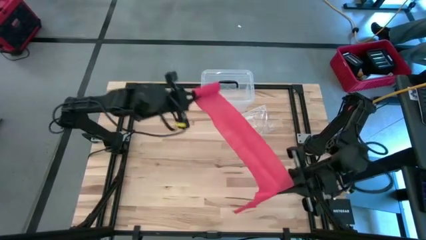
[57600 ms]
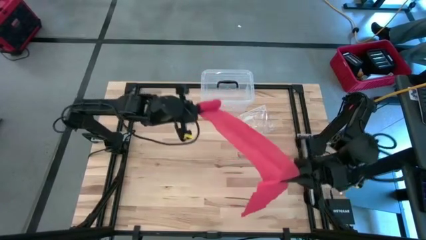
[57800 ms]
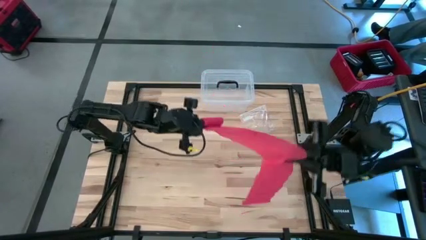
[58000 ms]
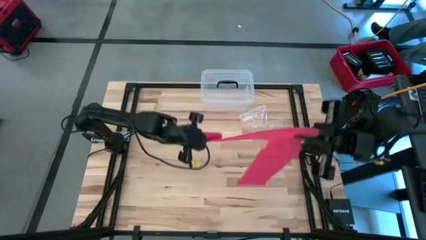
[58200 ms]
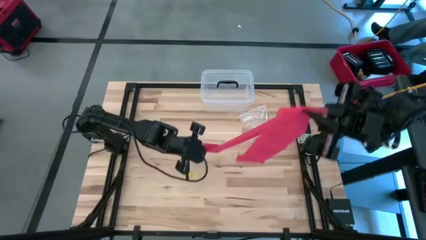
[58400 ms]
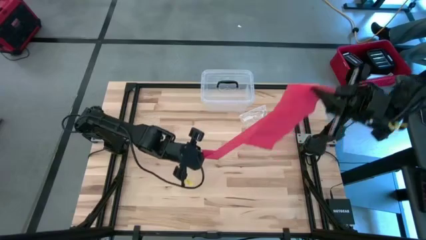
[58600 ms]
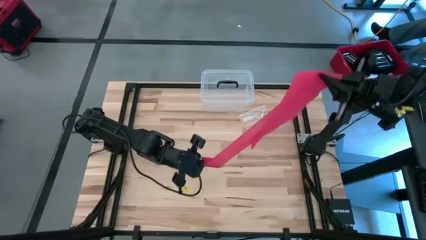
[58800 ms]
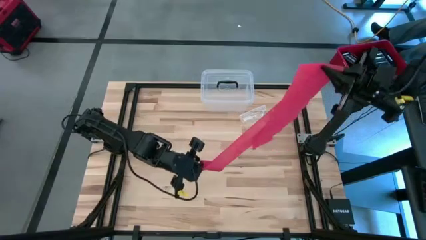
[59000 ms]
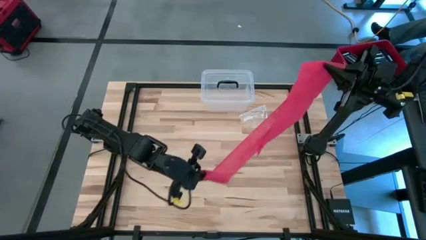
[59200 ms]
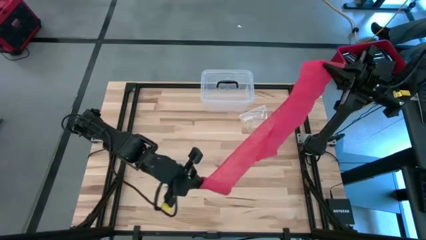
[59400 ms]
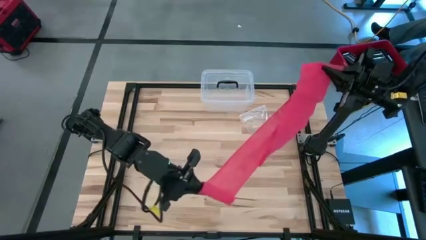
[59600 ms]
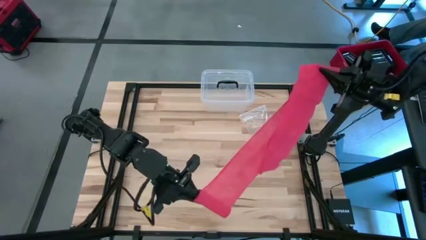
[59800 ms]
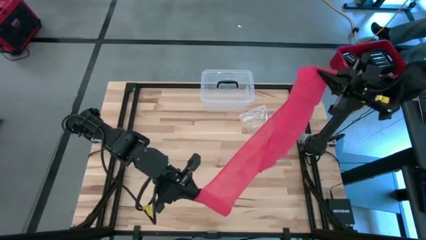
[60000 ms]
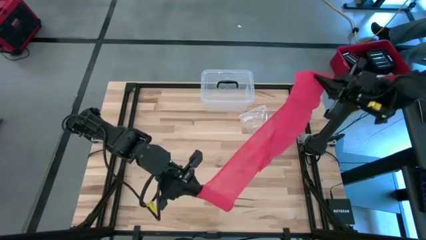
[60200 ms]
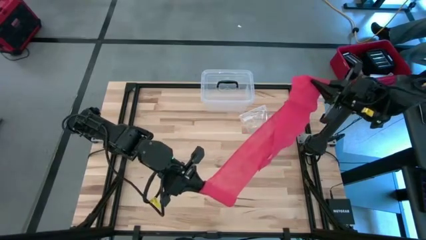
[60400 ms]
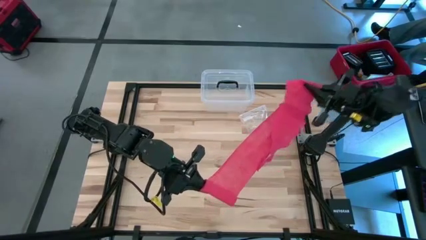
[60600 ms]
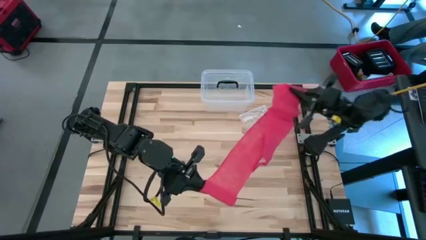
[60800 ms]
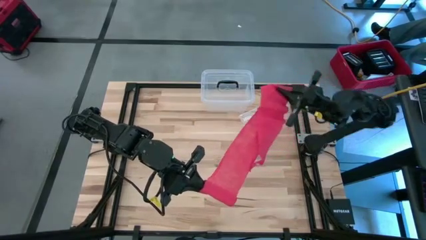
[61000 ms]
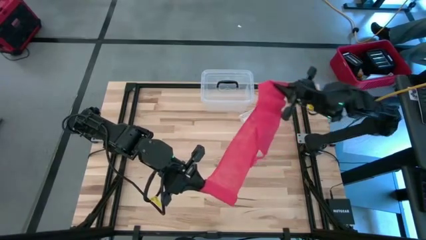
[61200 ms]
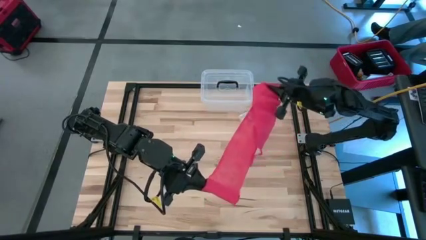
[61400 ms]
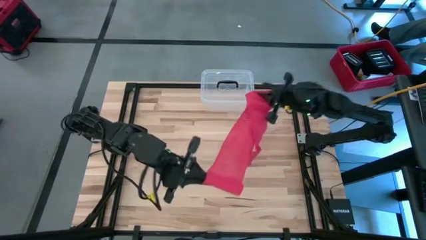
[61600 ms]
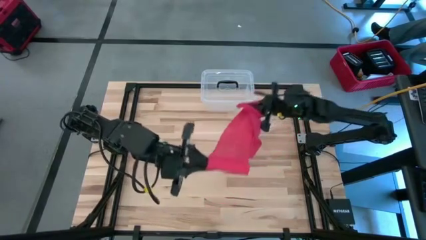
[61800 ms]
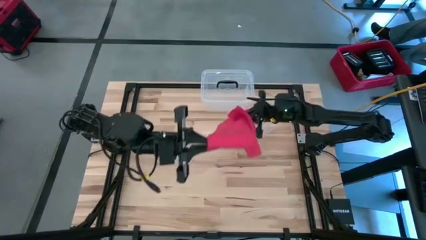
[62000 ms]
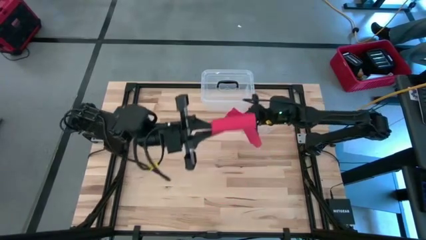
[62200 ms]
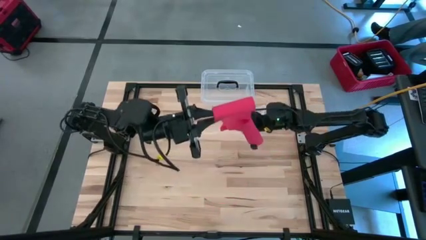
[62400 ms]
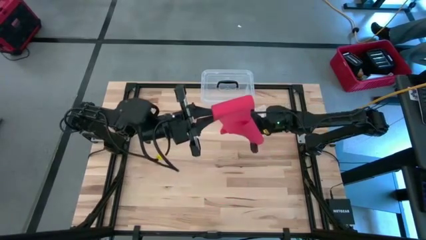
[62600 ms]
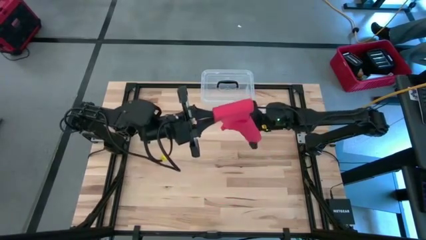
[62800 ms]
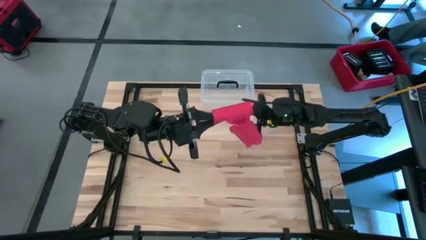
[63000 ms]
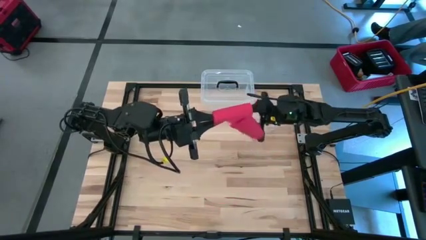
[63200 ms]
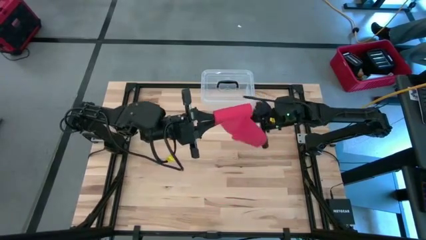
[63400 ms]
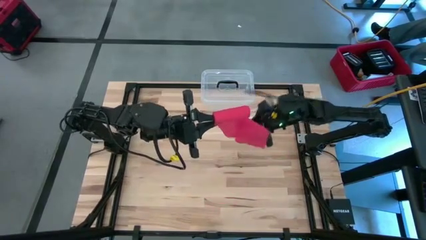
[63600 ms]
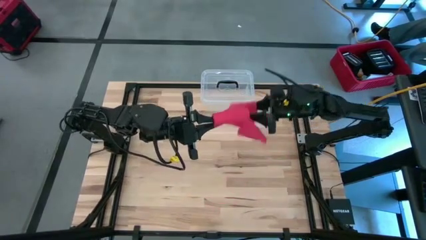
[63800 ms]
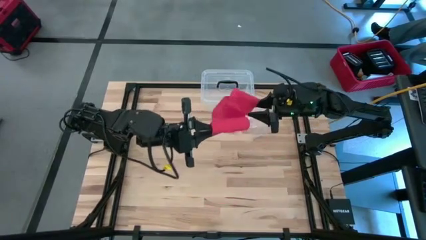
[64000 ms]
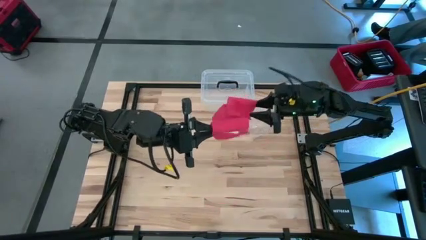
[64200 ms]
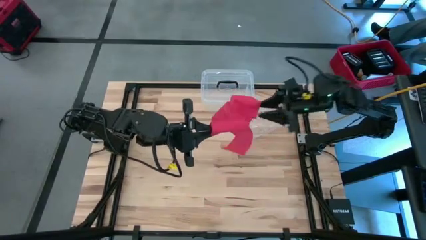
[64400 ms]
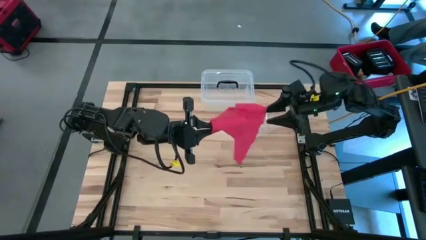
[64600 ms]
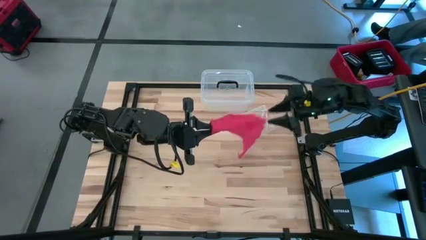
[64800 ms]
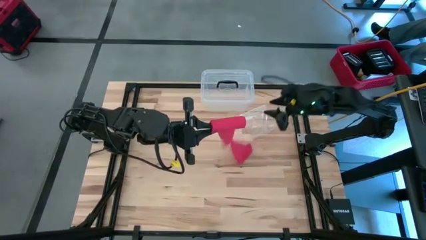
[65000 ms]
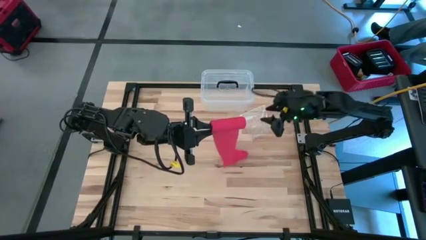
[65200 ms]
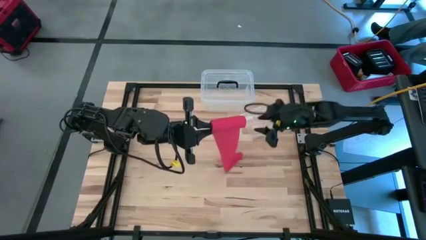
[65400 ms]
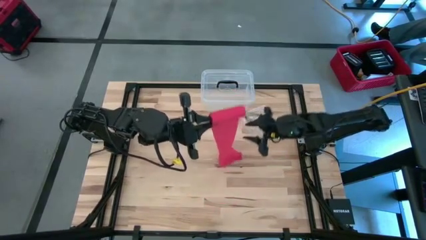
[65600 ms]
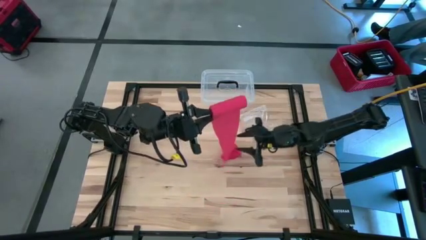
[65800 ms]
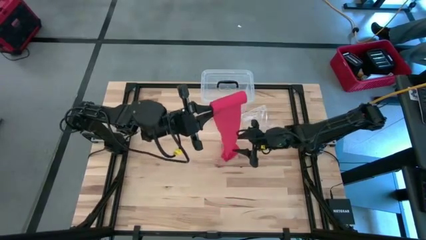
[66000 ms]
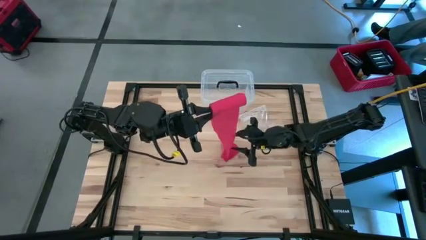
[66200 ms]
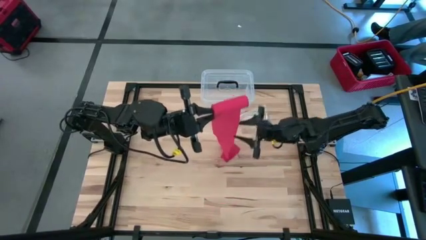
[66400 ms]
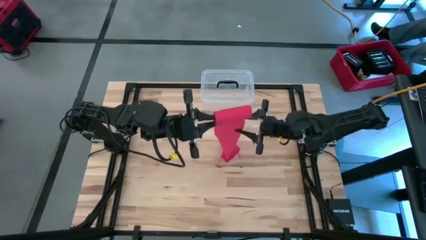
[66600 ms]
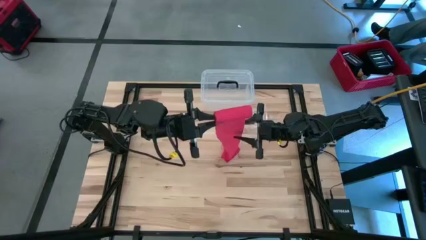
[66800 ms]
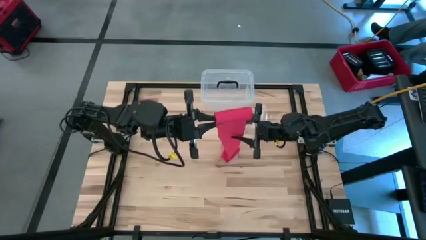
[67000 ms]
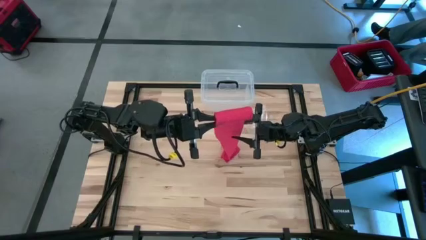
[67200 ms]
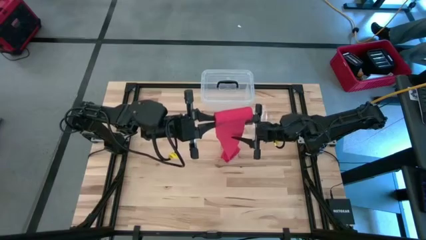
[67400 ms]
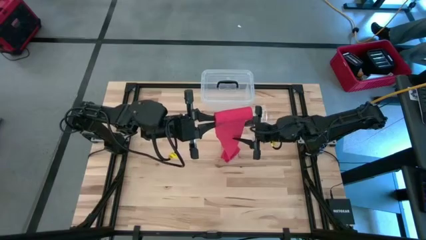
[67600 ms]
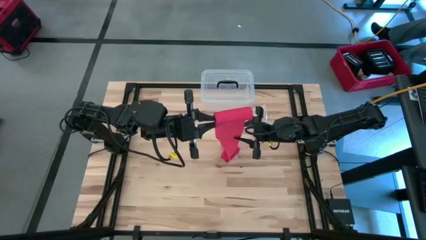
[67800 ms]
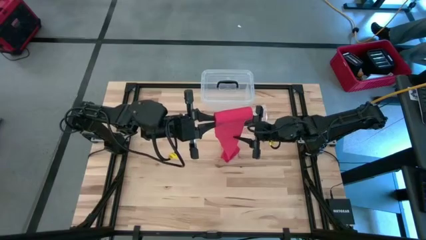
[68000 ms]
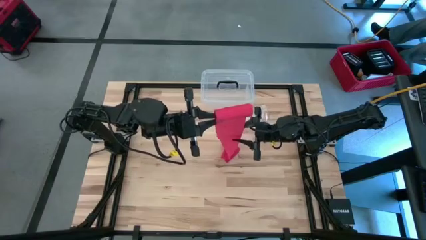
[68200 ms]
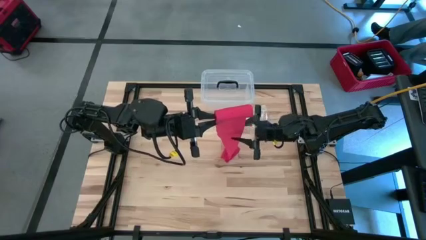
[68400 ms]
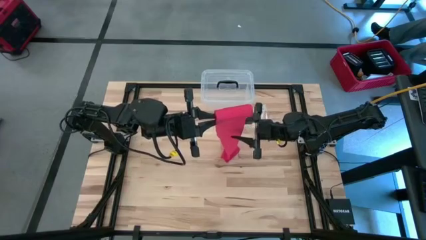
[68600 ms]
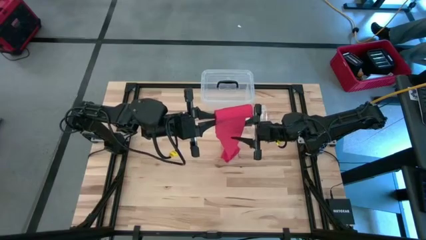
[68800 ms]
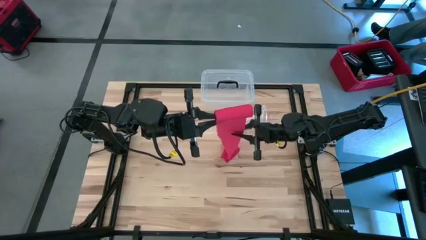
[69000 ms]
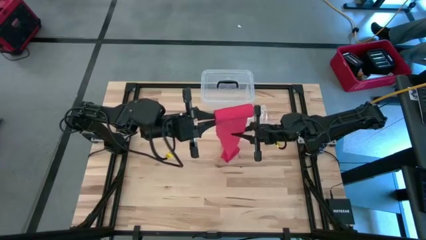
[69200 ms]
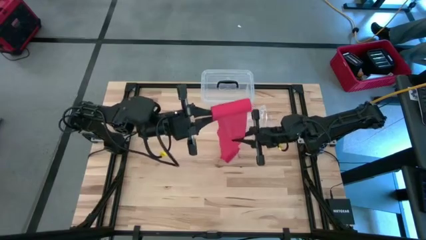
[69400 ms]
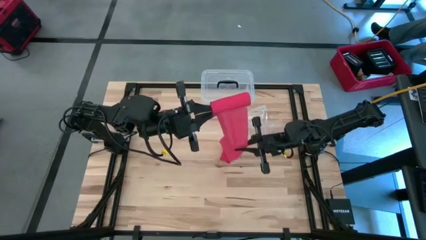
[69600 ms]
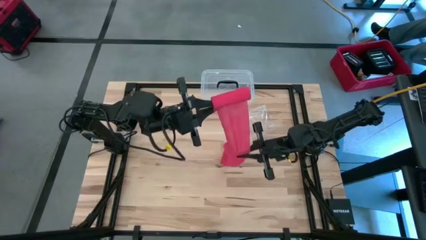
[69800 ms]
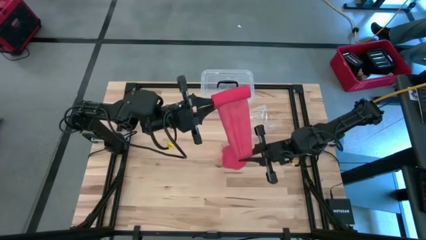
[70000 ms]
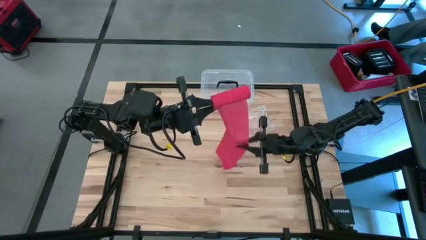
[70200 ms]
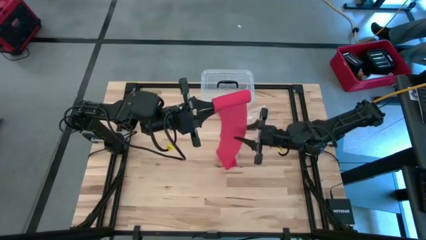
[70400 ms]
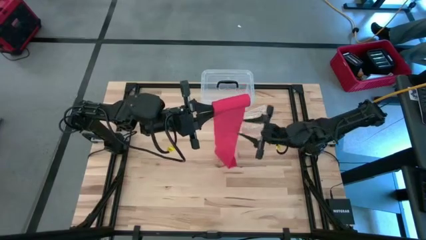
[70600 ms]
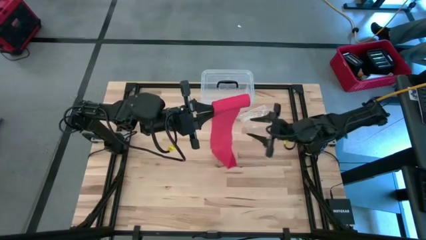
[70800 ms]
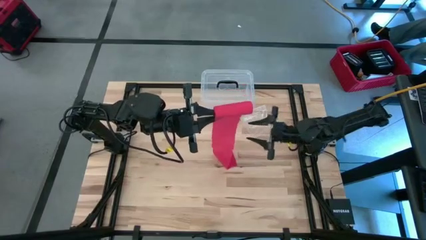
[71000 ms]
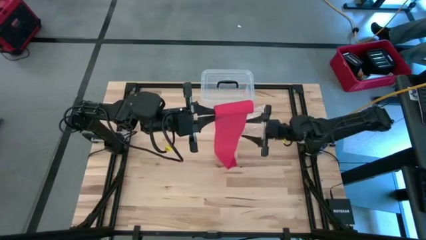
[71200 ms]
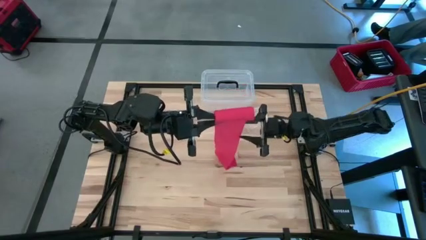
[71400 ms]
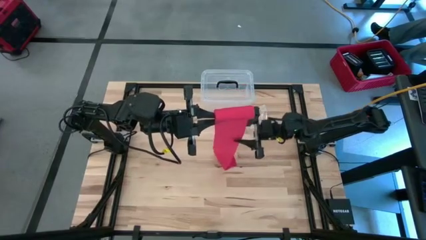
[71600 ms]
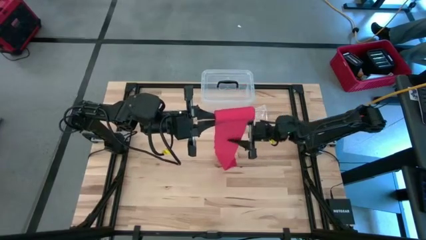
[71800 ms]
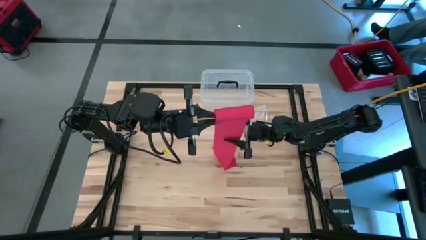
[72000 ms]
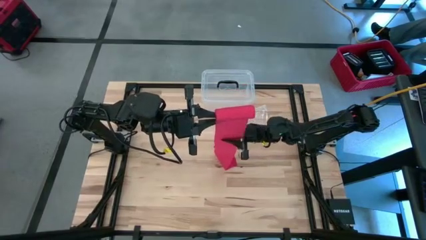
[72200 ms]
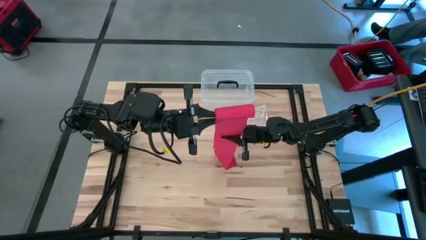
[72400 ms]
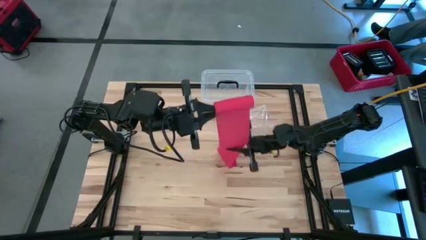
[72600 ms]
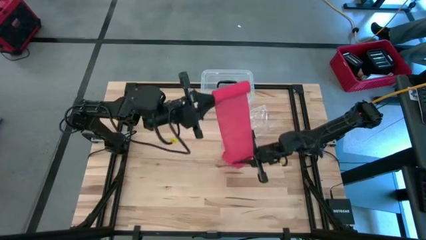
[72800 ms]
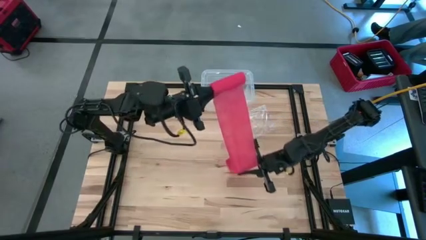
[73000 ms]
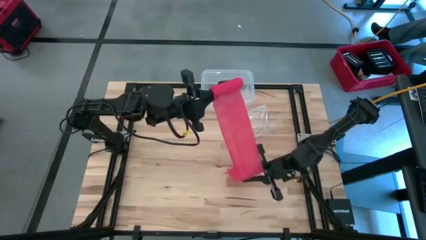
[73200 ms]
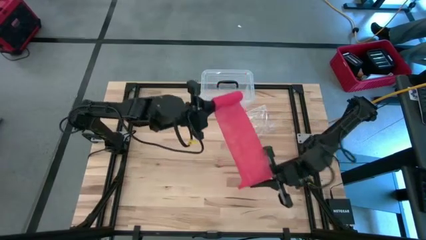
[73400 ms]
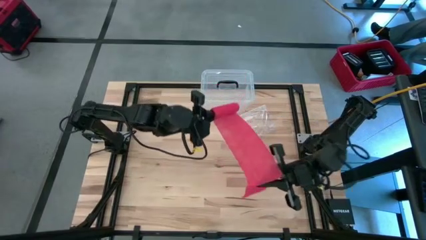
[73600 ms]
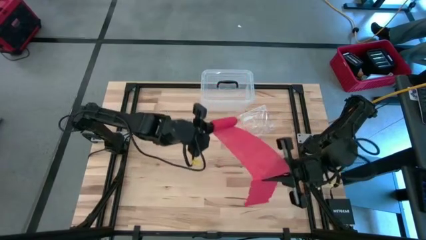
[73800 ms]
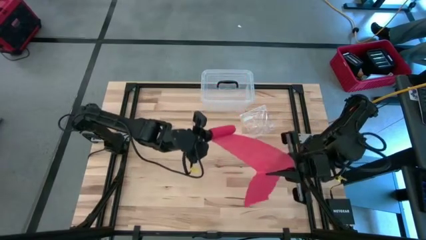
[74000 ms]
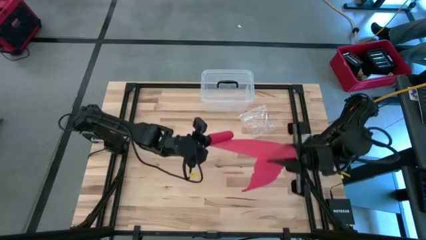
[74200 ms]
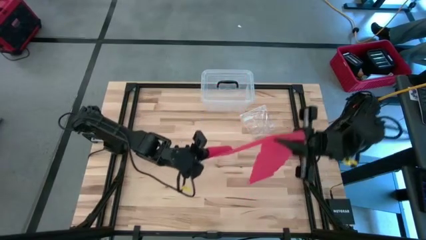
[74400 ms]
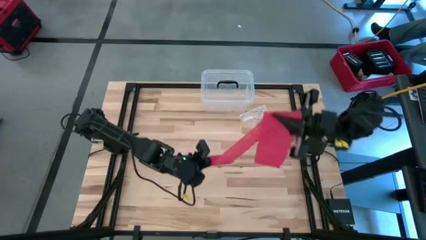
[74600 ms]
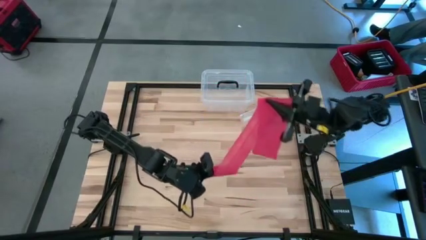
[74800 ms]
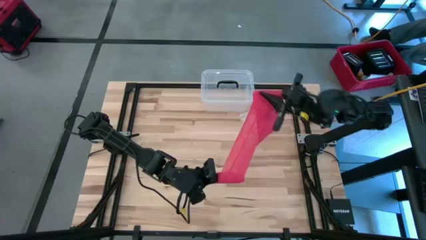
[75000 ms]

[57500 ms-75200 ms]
Task: Roll bandage
Roll the red bandage

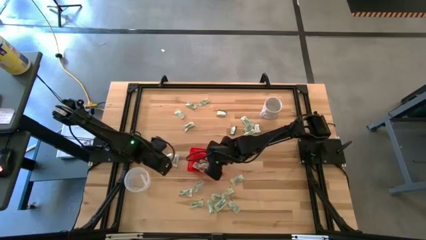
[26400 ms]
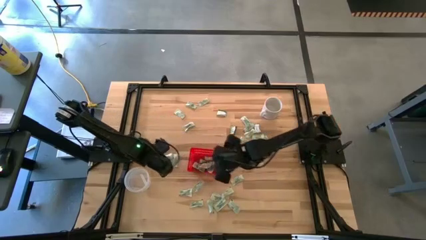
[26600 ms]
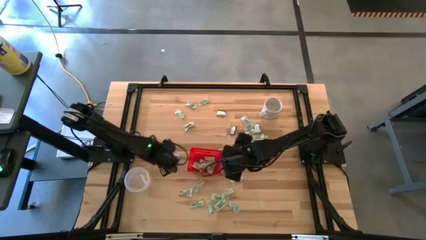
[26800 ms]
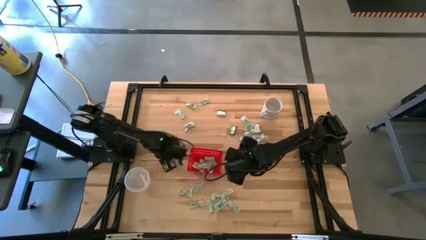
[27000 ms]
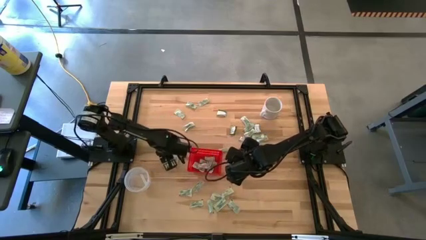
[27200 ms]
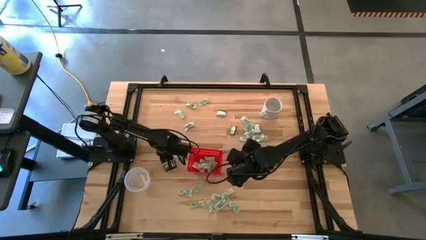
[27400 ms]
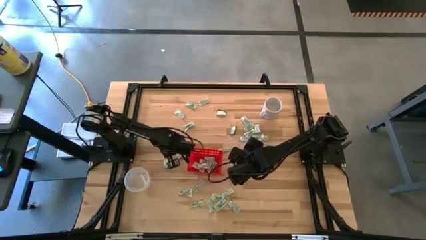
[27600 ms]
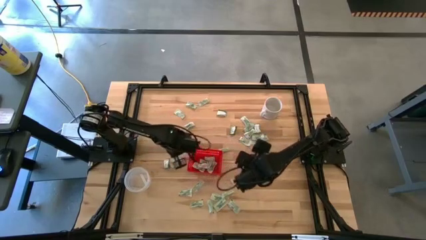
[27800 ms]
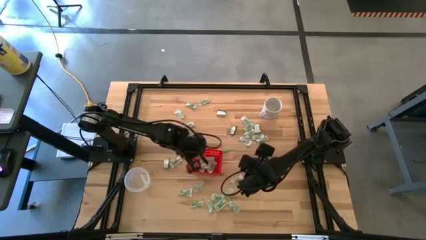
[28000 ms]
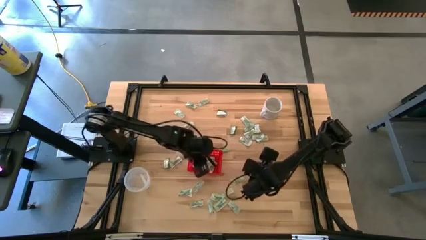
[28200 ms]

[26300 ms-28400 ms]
Task: Pick and place Stevia / Truvia into bins
Put the green stevia packet into the red basket
